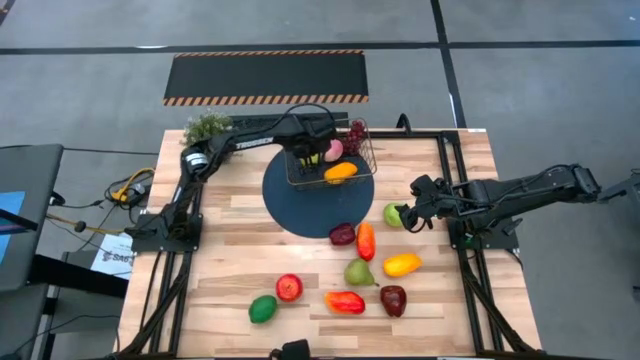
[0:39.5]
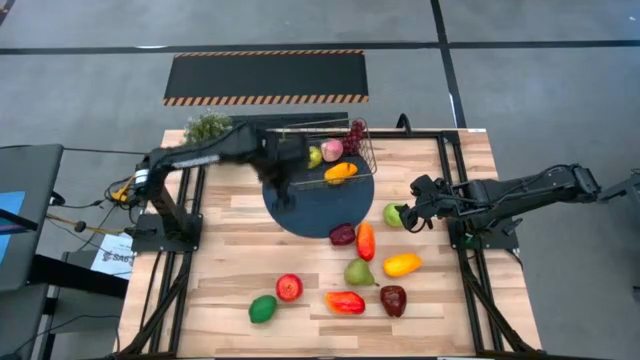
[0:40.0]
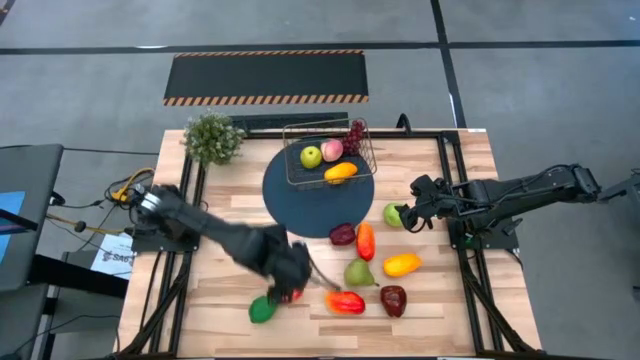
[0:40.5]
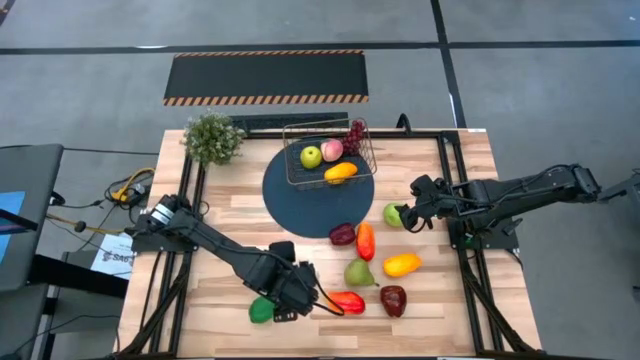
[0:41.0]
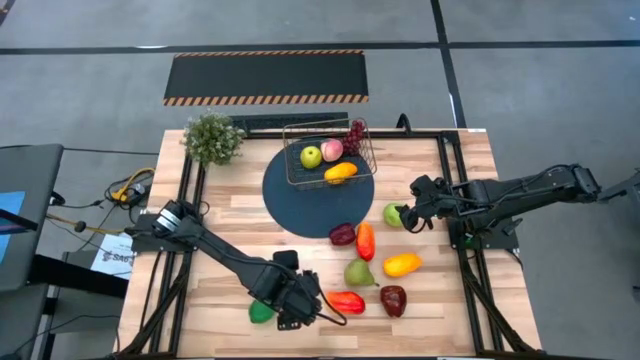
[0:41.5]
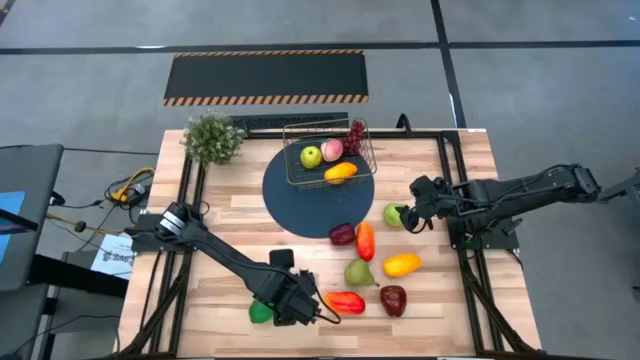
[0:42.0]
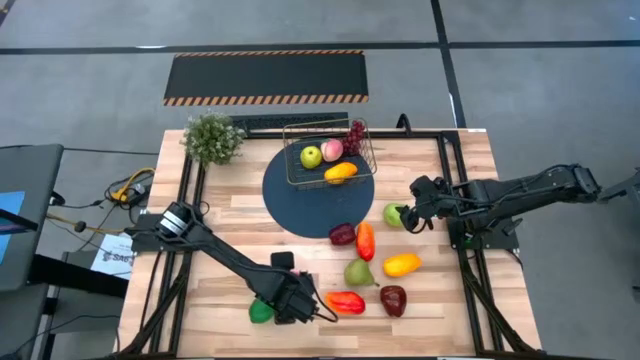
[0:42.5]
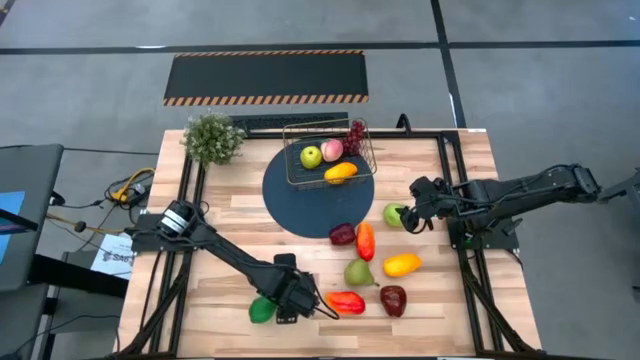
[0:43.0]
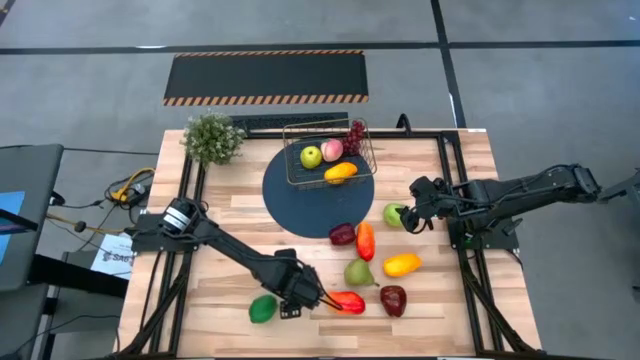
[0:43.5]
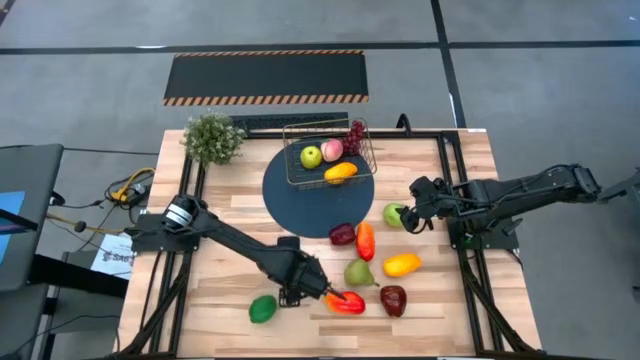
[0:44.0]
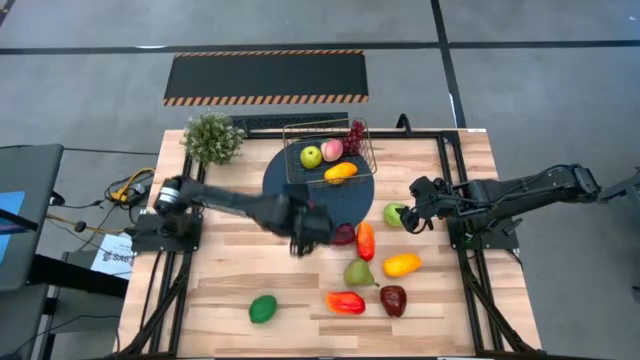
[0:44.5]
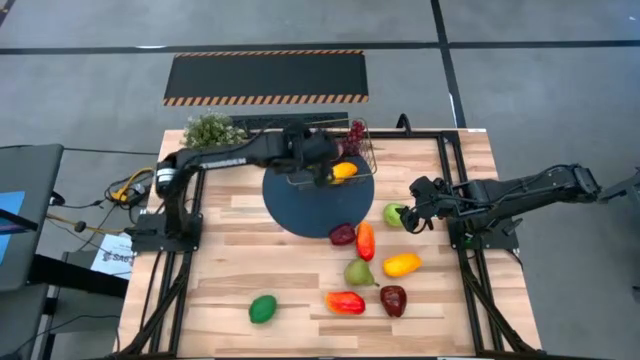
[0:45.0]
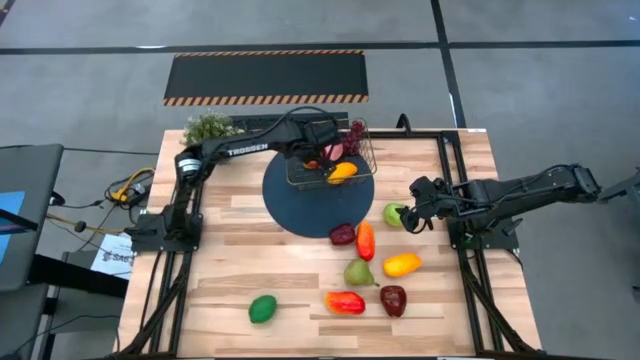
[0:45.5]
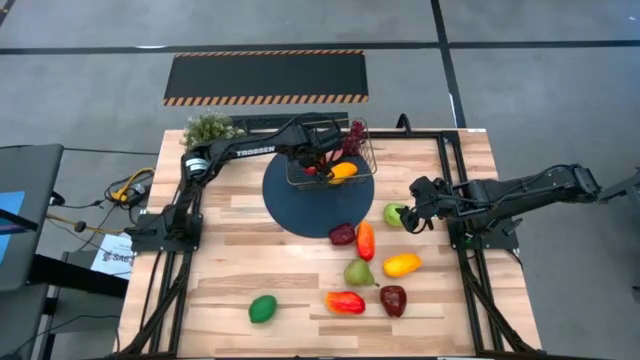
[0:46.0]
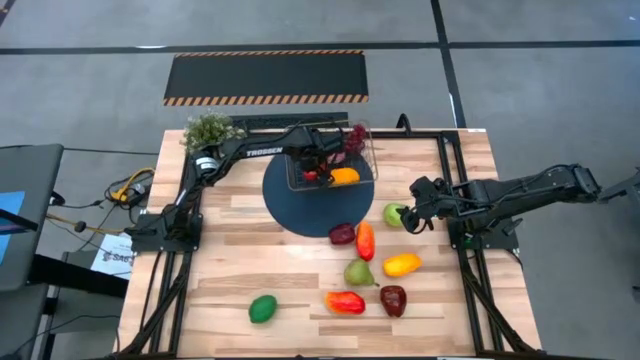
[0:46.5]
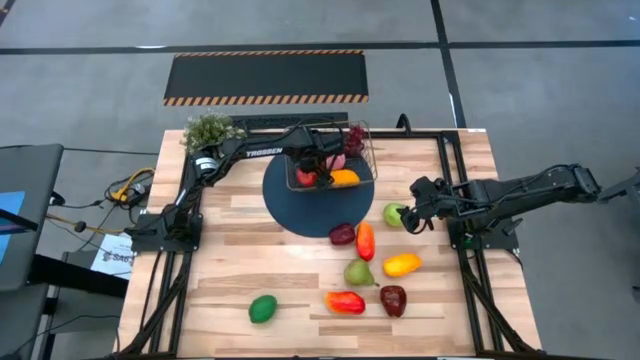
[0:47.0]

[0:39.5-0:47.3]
Task: Build produce basket
Put the red apple into the wire basket

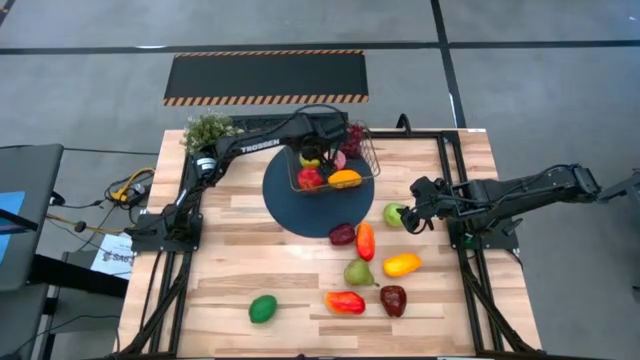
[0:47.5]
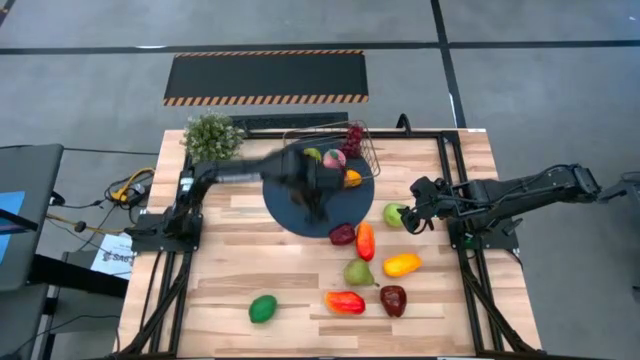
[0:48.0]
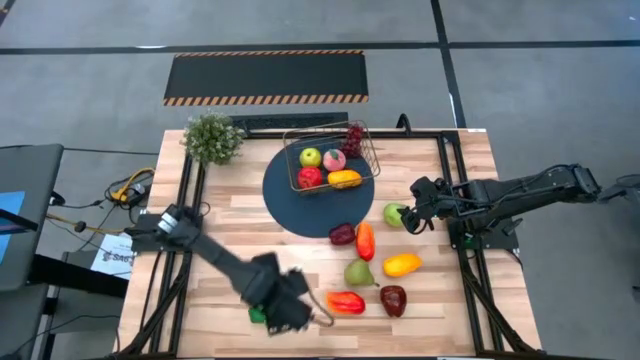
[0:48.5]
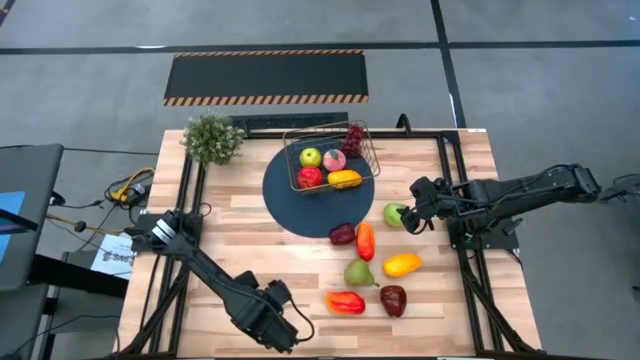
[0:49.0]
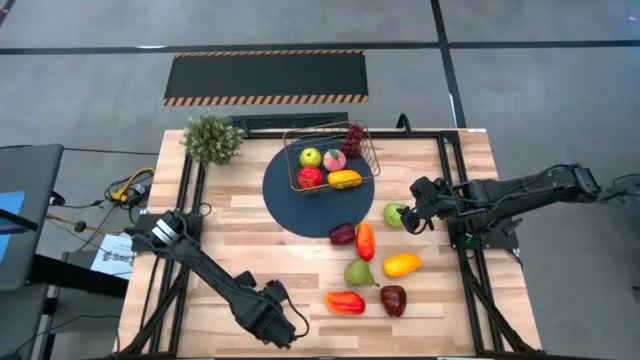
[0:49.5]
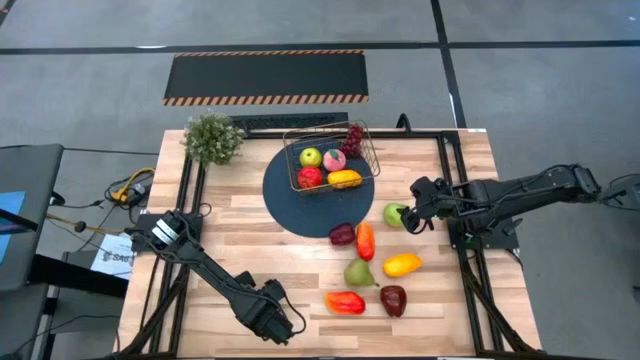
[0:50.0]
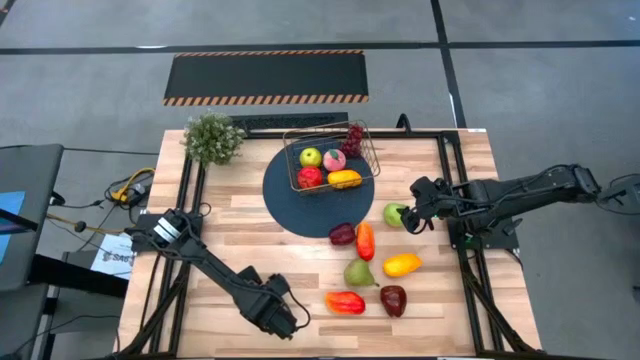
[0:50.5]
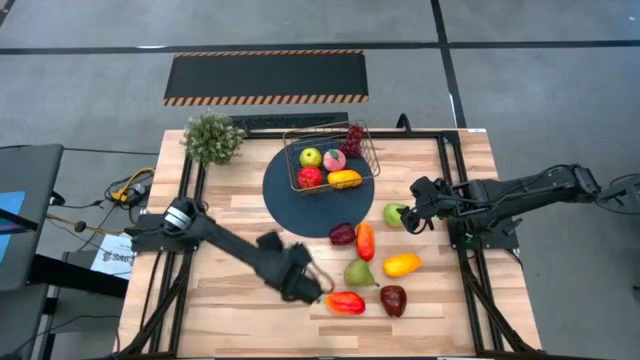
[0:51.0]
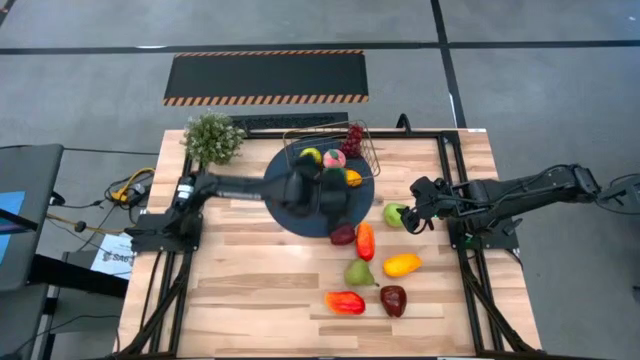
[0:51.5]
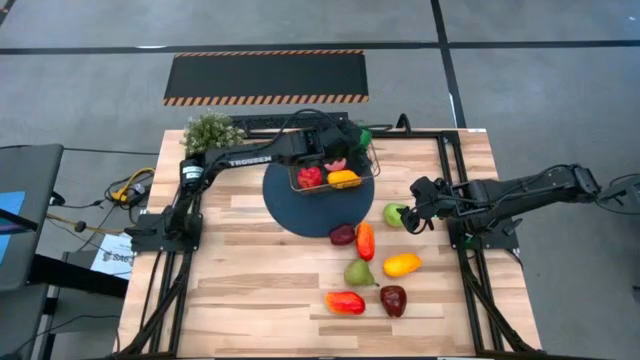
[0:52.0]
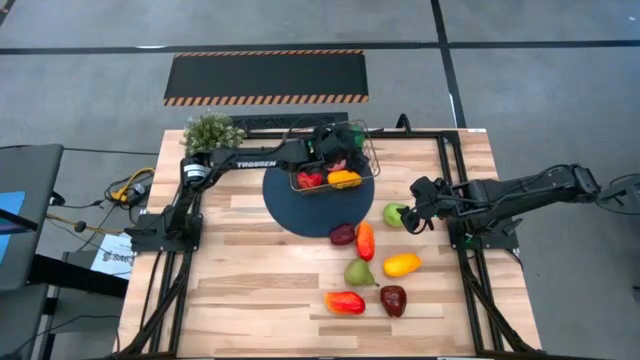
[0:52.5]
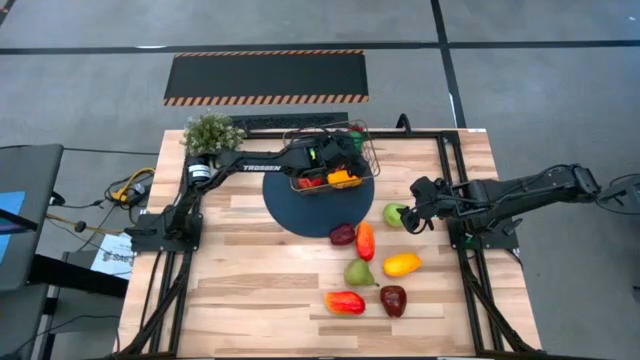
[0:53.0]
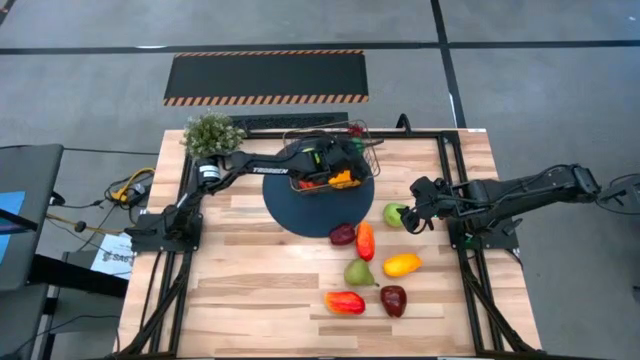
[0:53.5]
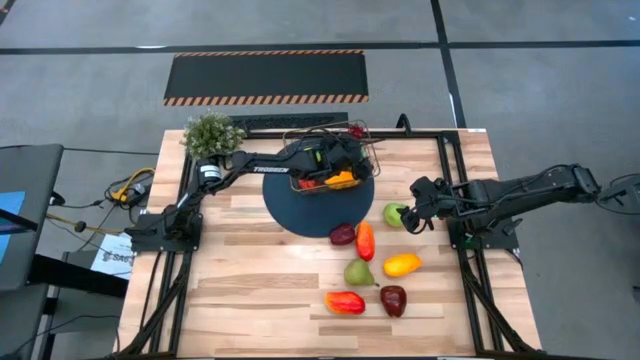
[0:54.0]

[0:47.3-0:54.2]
Put the lime into the wire basket

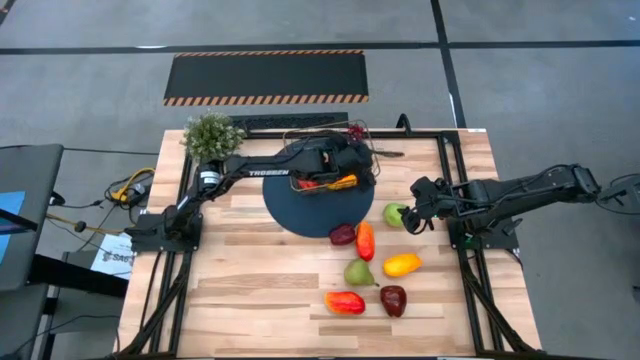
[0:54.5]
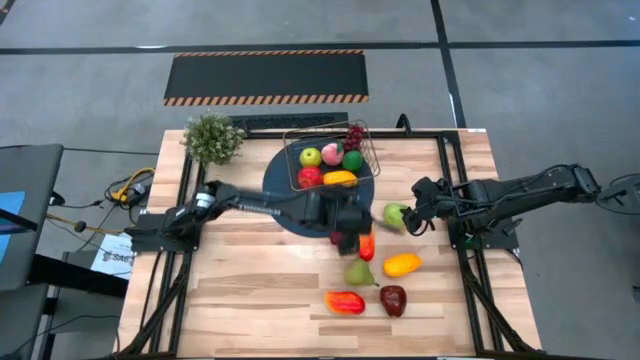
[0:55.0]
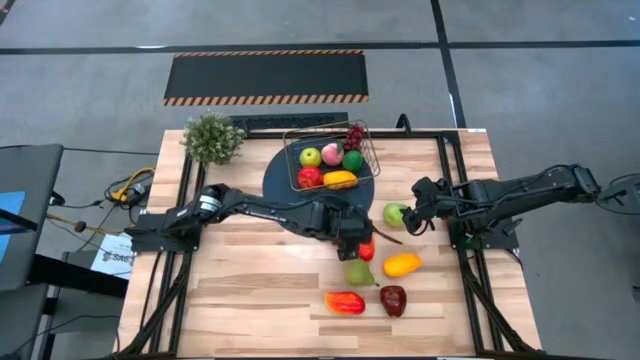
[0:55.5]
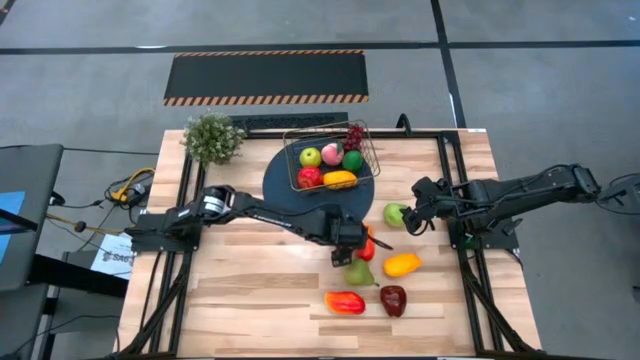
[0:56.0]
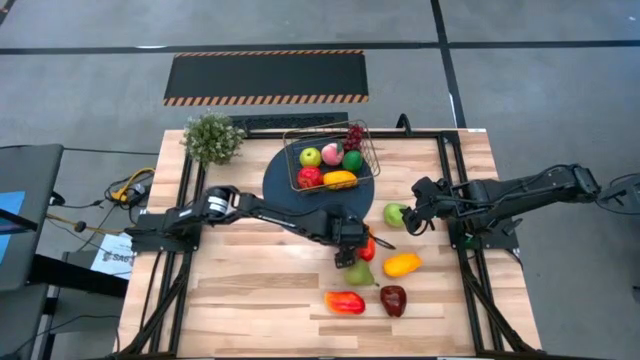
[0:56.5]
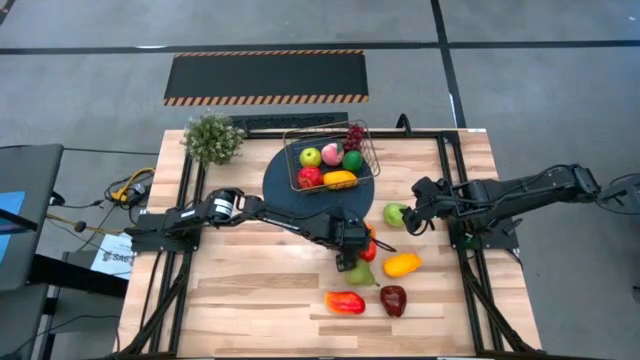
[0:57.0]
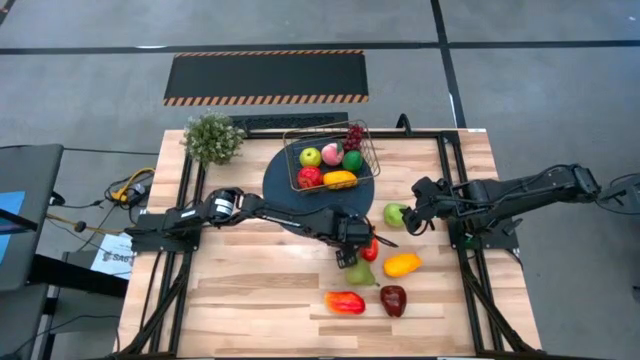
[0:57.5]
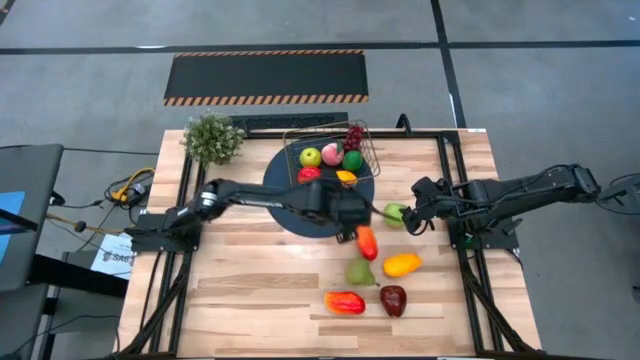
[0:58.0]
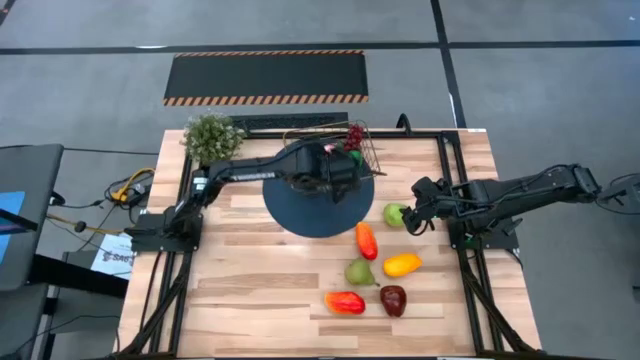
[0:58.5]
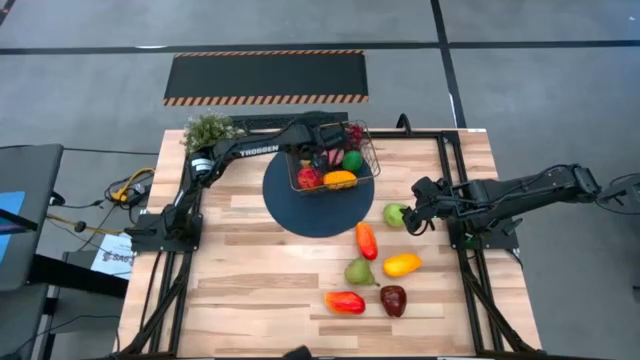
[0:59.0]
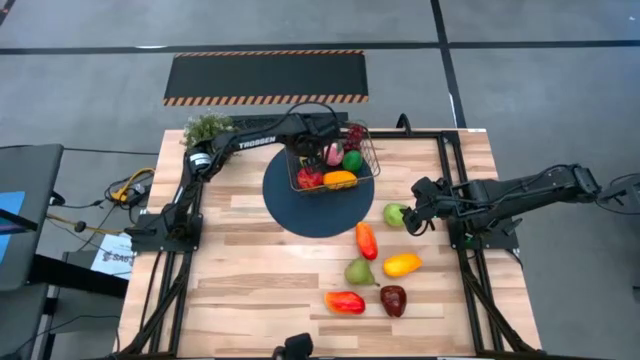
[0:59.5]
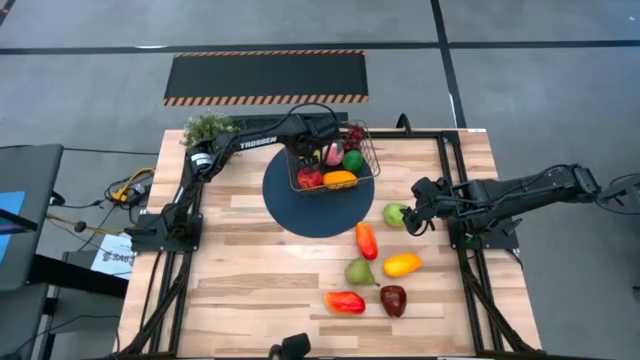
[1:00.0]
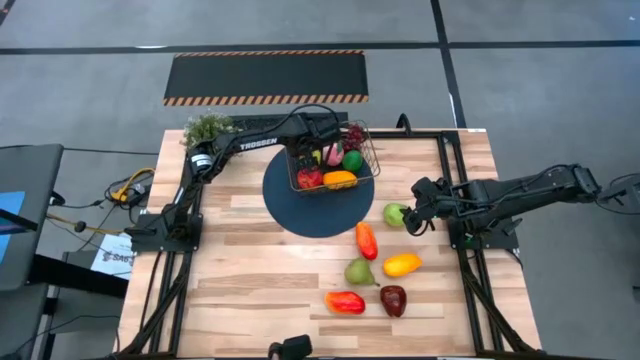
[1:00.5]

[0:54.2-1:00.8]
Put the top dark red apple into the wire basket
